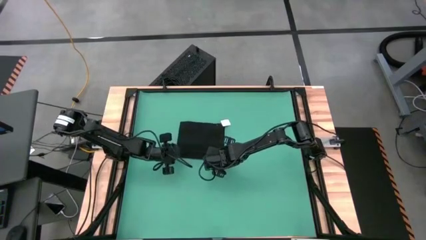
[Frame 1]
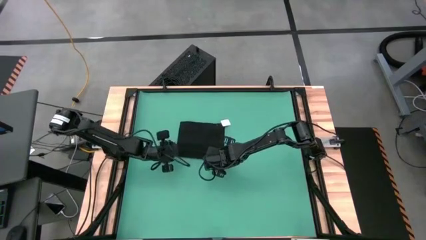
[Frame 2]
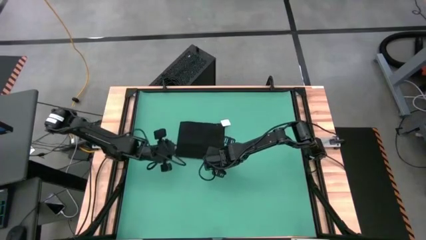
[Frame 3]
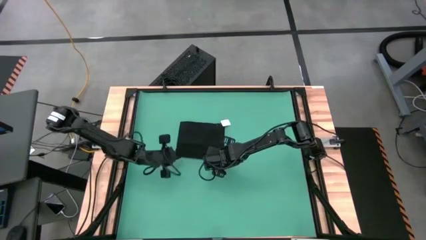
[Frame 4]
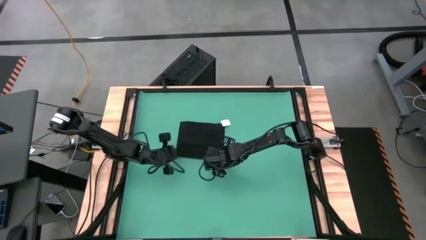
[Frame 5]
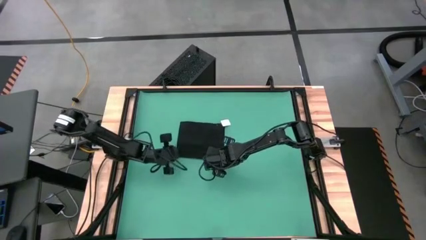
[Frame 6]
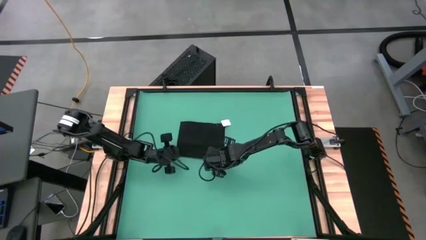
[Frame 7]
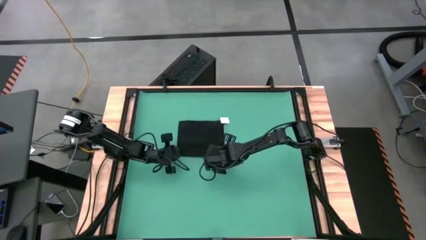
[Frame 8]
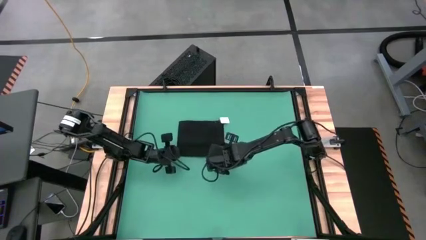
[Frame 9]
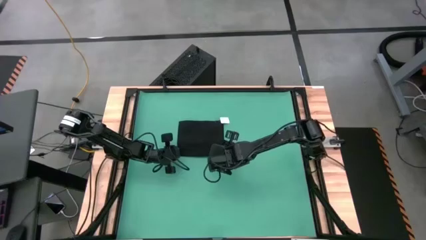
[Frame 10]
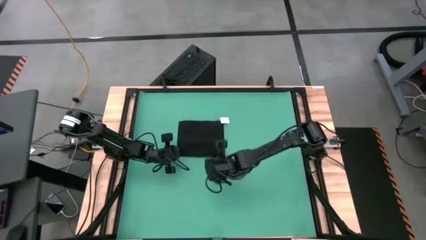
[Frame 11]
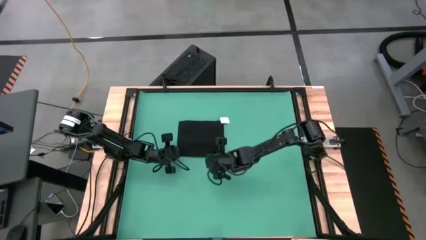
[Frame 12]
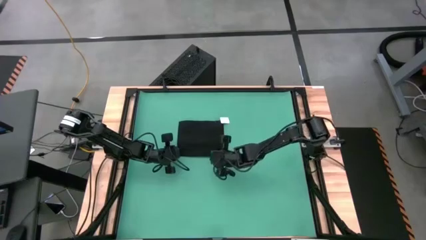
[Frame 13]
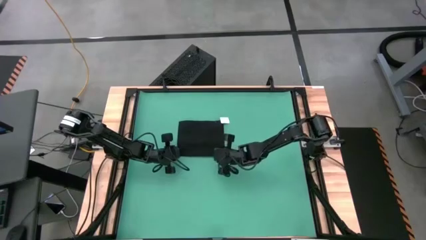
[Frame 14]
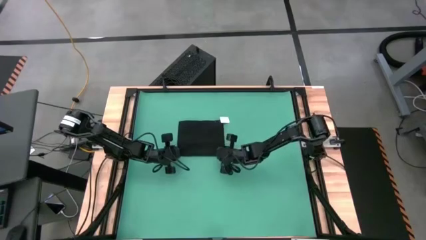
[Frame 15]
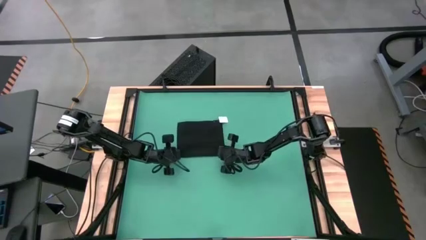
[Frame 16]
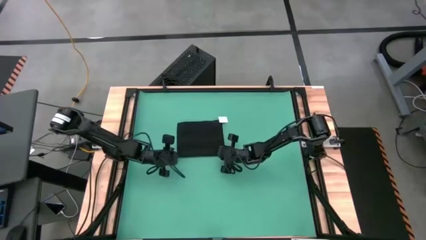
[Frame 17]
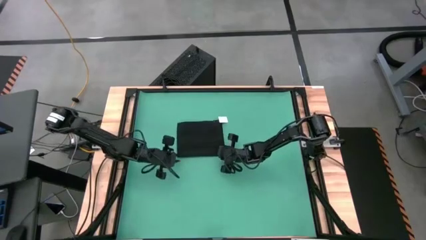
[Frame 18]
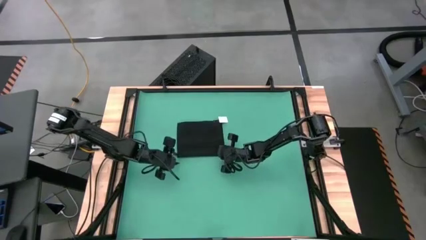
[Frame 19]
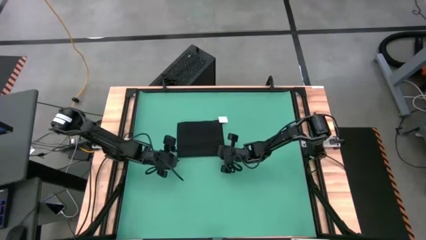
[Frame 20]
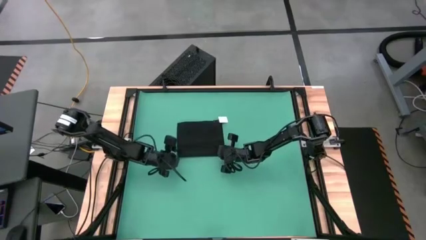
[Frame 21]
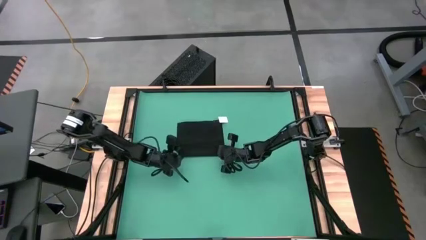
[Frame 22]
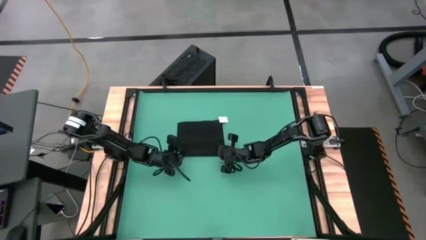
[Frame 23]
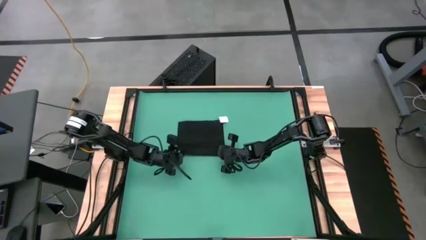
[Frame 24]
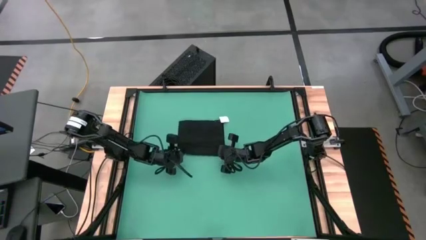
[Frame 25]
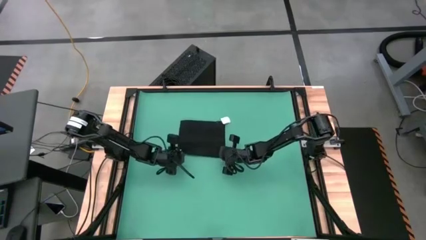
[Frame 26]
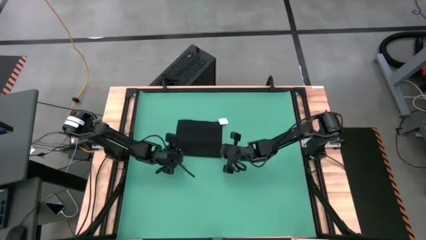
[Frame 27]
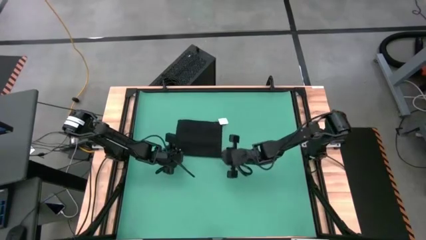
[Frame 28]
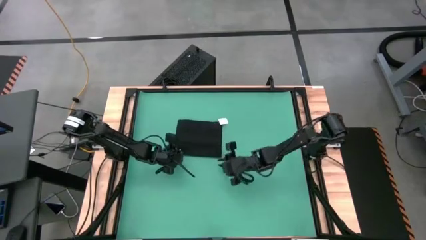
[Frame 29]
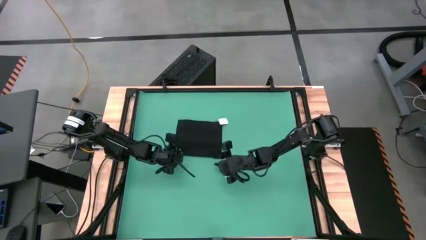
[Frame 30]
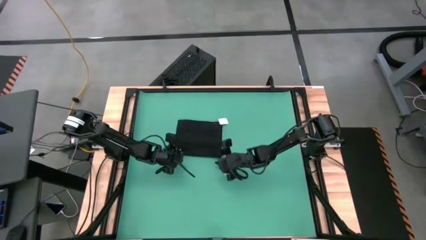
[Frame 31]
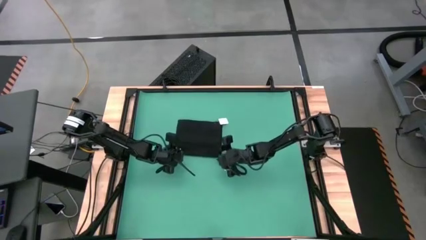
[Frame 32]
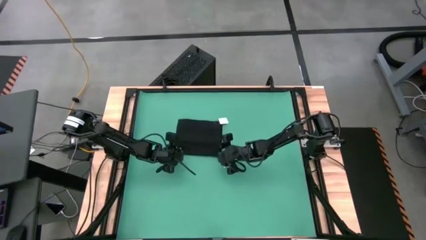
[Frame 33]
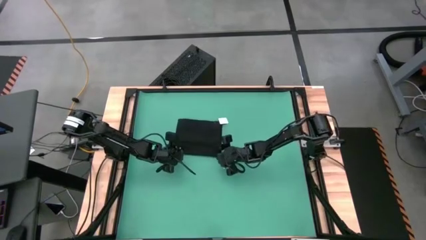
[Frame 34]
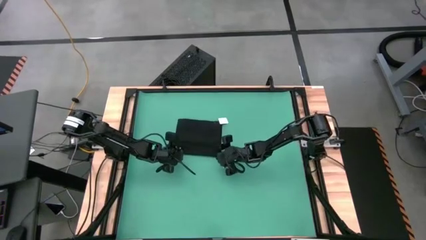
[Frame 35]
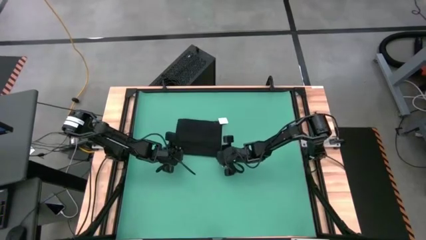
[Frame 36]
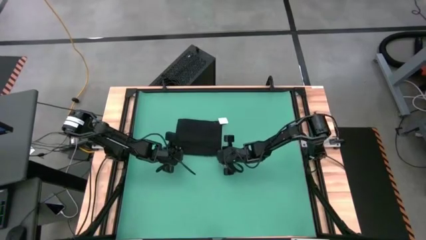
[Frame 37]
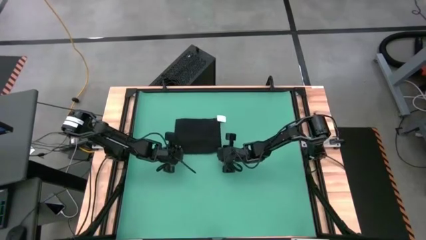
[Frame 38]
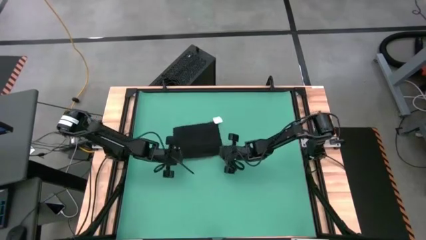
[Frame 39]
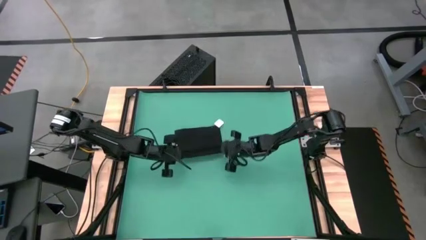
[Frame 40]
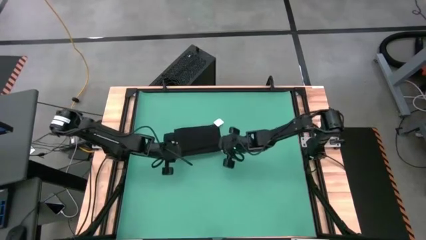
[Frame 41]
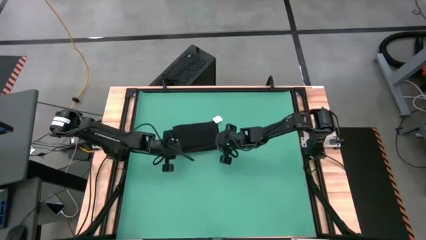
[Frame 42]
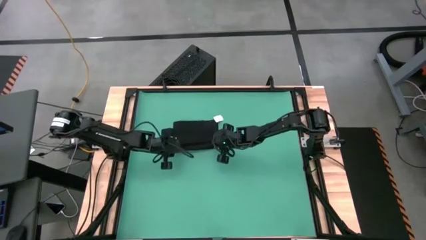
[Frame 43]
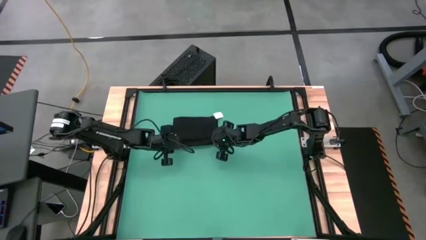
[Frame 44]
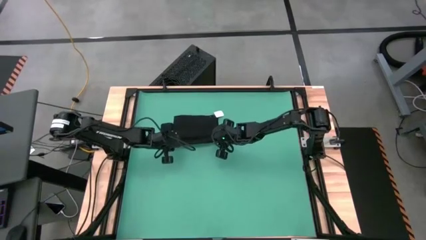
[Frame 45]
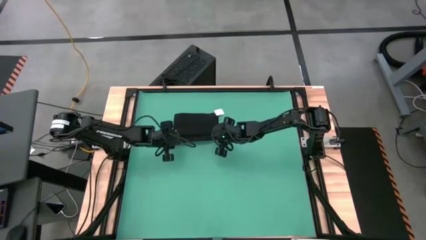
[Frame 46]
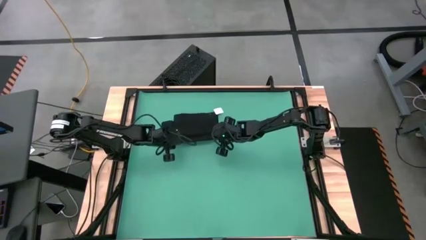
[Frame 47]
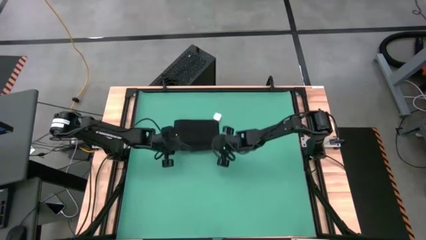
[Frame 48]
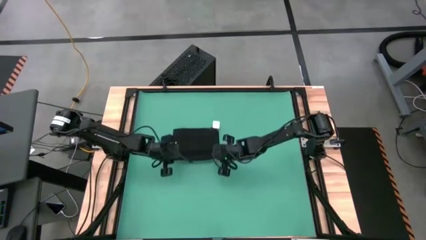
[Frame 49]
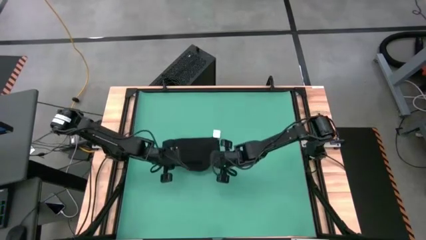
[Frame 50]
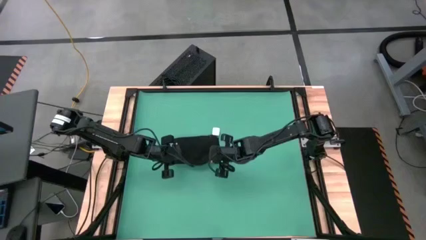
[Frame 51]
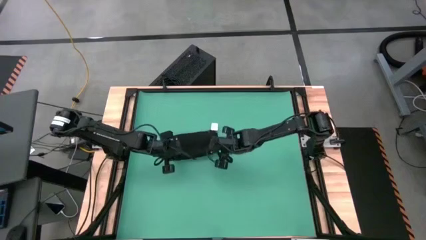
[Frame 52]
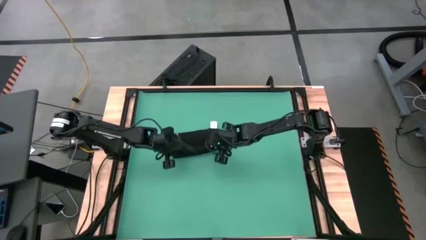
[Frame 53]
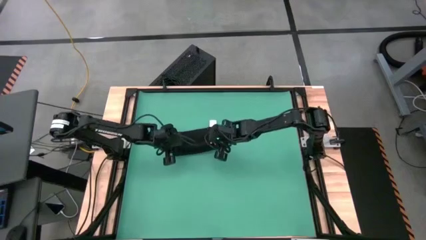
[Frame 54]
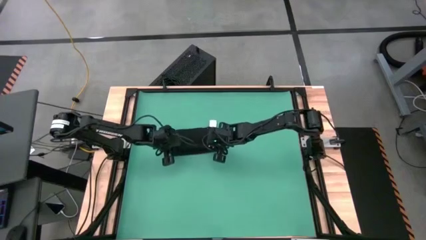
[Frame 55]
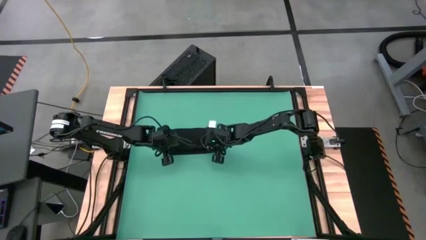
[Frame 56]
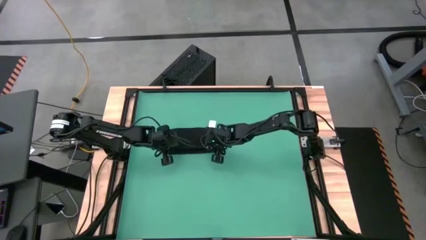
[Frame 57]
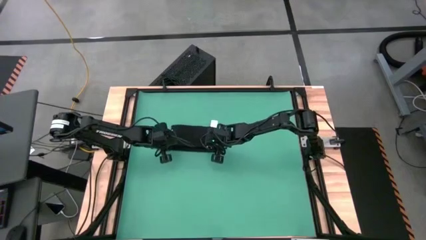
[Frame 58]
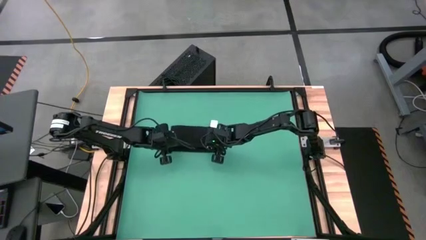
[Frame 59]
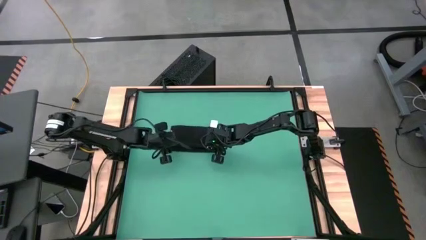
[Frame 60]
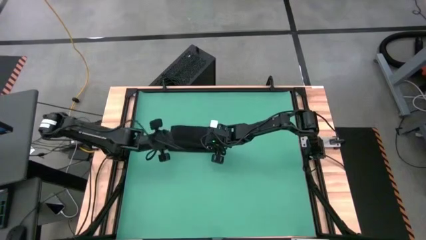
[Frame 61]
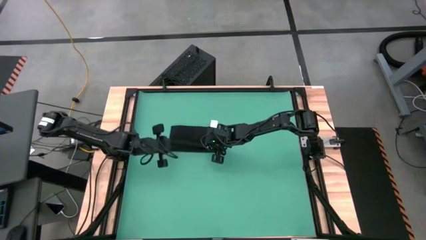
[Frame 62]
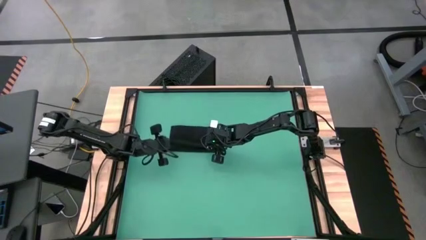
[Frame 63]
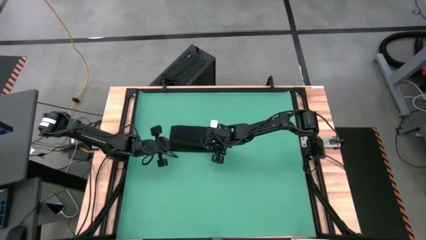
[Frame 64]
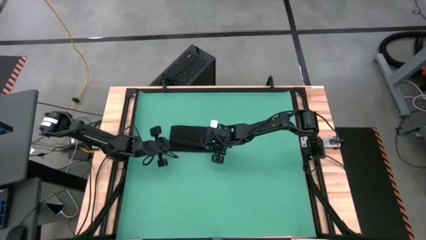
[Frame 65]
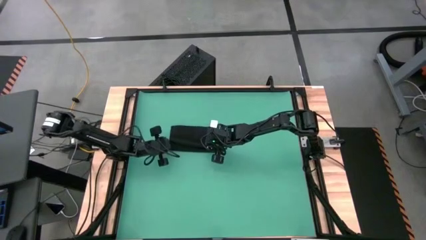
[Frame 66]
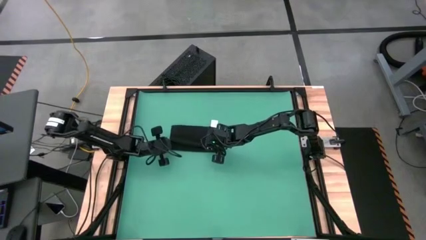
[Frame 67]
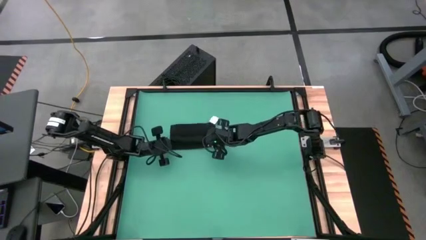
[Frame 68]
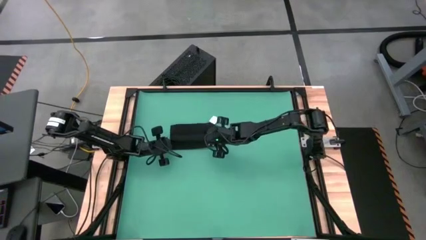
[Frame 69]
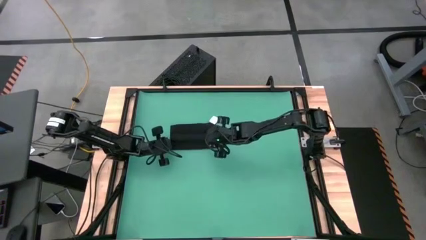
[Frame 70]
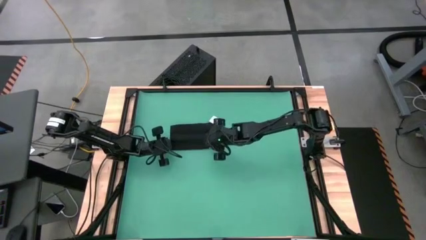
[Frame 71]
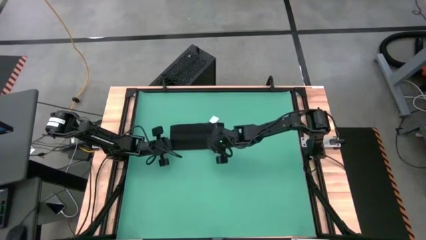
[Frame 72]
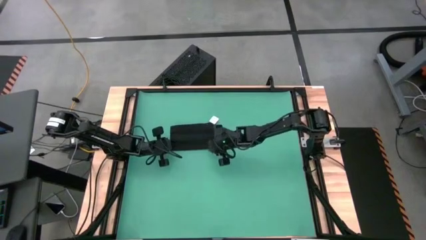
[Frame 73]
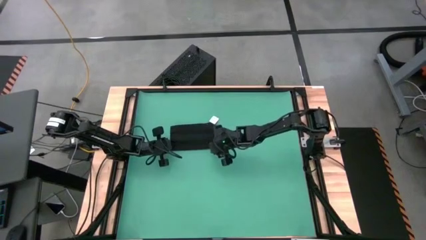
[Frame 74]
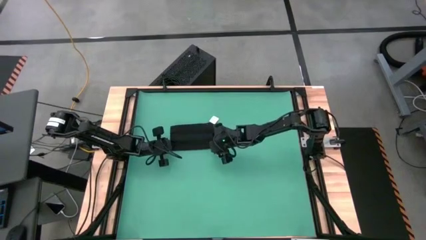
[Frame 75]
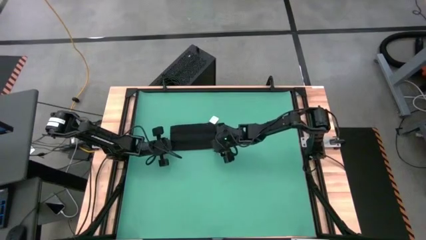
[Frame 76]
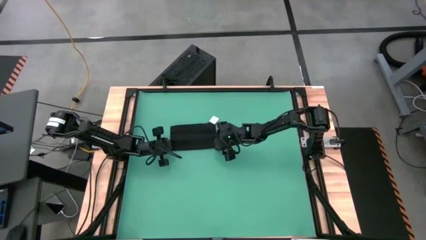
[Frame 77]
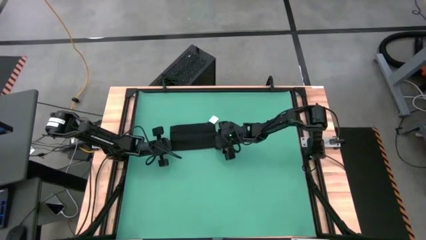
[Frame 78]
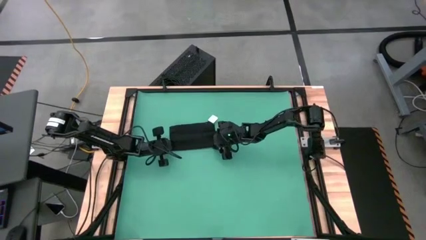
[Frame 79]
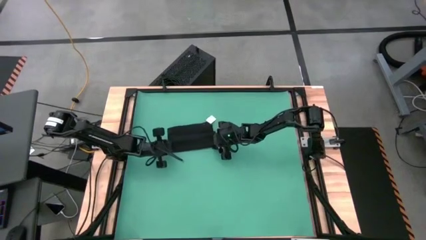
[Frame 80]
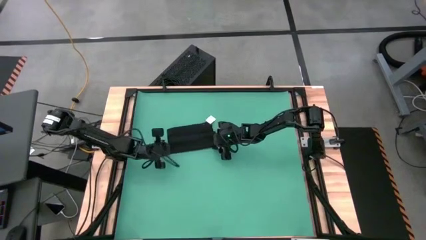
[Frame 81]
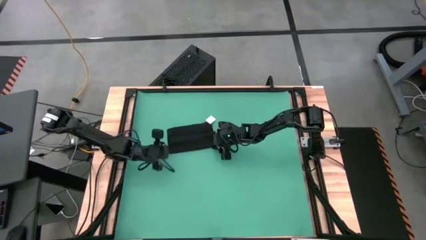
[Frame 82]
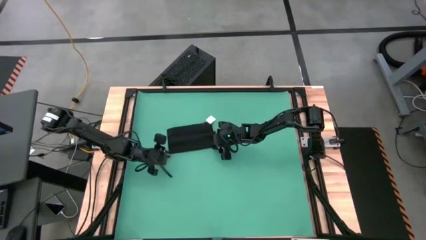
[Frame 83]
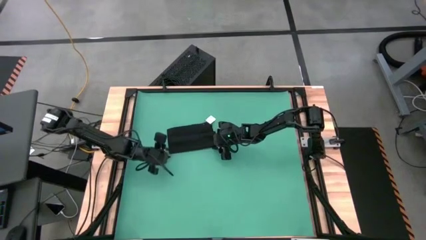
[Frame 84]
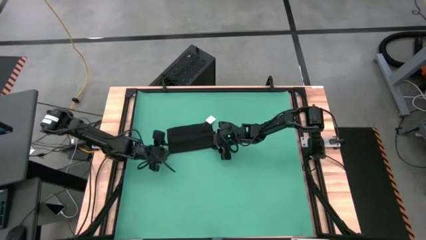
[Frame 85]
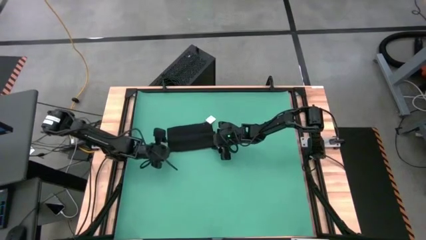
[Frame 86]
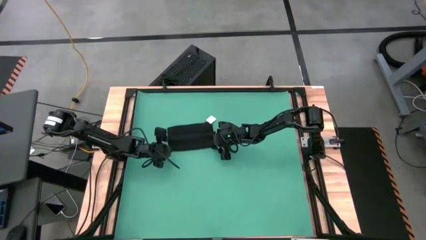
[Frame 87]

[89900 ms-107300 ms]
Task: Roll towel
Roll the black towel
